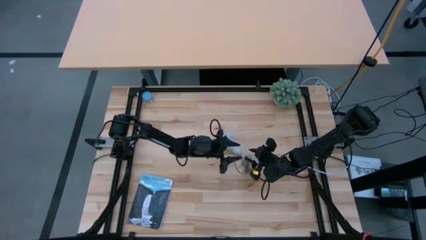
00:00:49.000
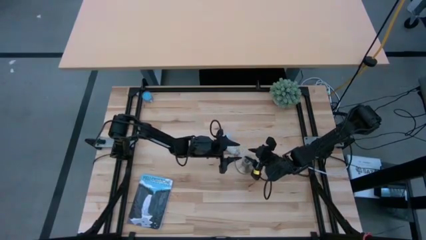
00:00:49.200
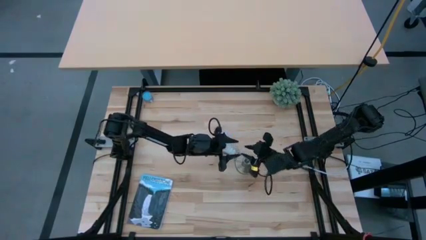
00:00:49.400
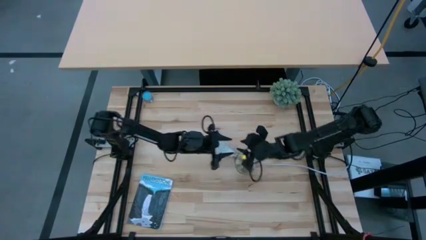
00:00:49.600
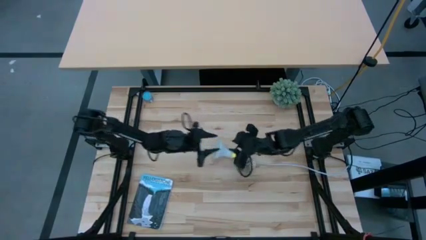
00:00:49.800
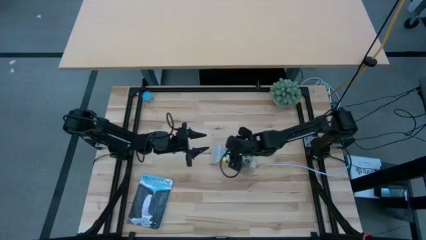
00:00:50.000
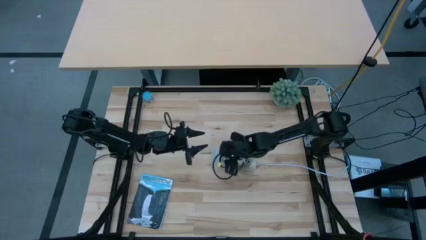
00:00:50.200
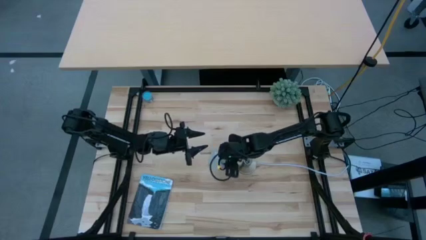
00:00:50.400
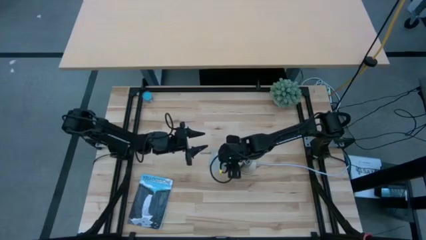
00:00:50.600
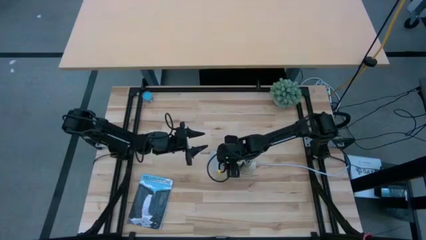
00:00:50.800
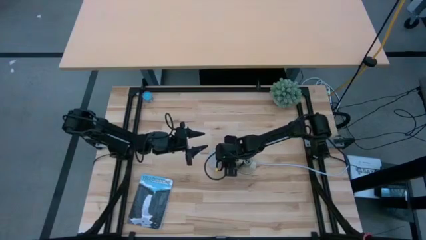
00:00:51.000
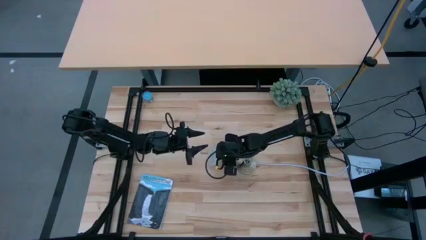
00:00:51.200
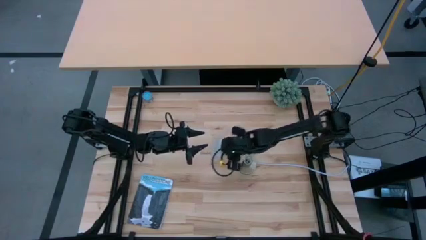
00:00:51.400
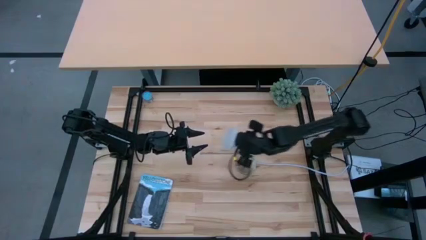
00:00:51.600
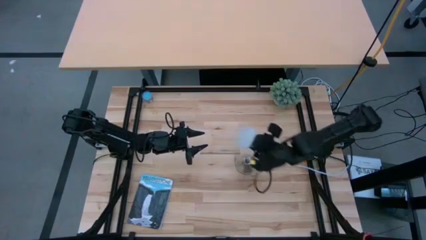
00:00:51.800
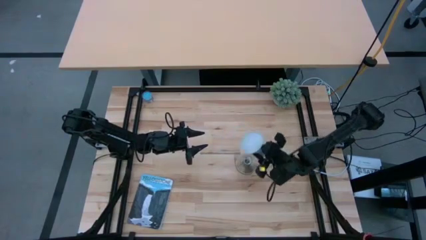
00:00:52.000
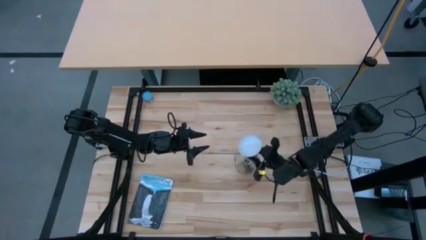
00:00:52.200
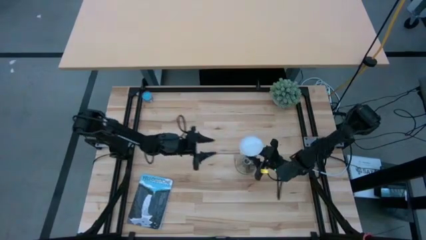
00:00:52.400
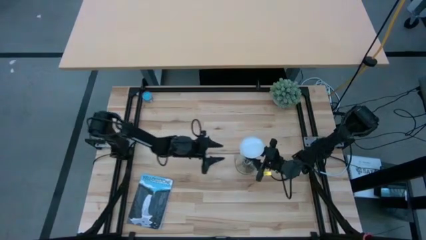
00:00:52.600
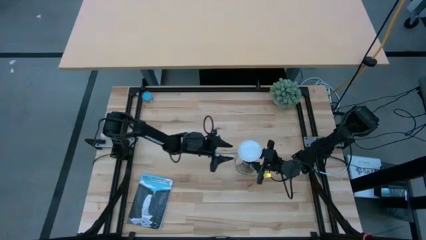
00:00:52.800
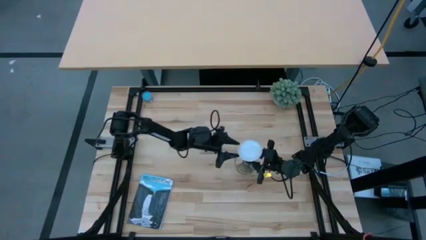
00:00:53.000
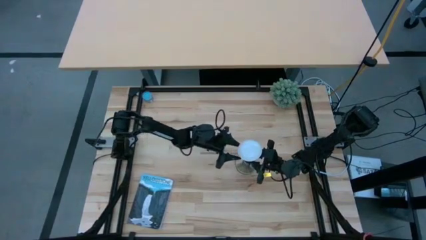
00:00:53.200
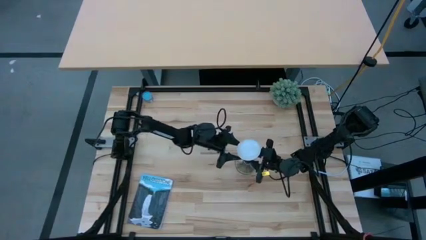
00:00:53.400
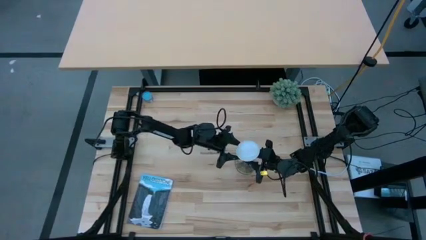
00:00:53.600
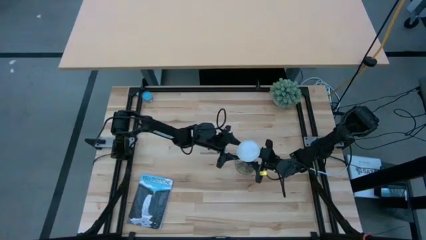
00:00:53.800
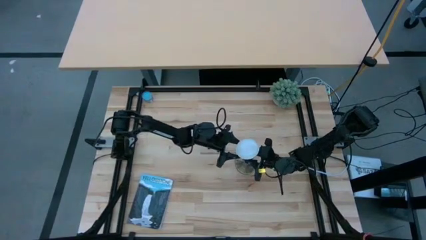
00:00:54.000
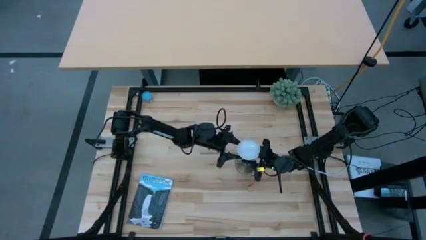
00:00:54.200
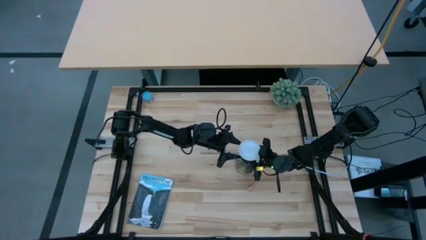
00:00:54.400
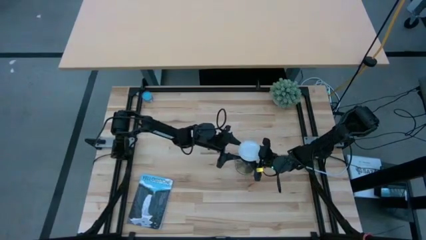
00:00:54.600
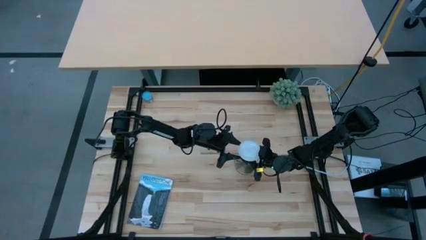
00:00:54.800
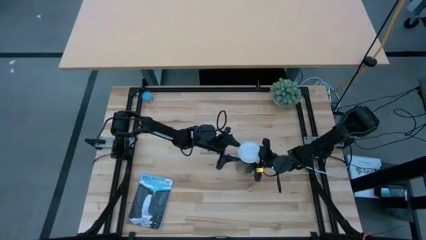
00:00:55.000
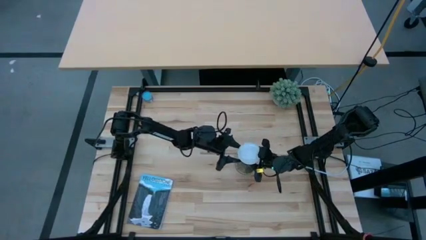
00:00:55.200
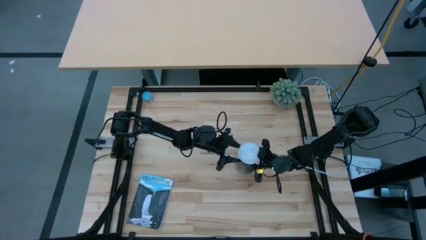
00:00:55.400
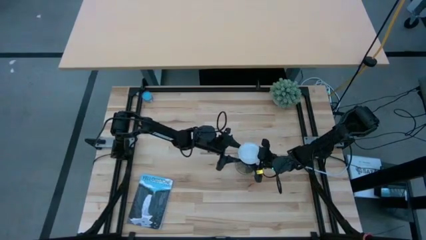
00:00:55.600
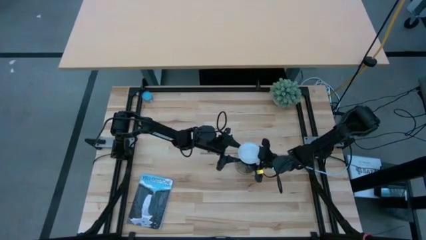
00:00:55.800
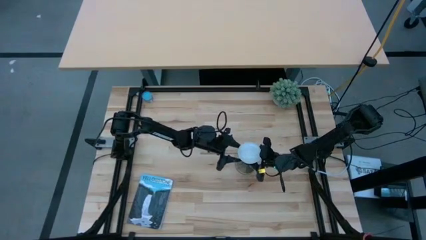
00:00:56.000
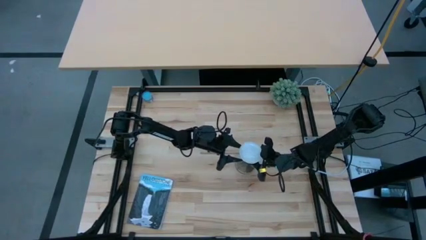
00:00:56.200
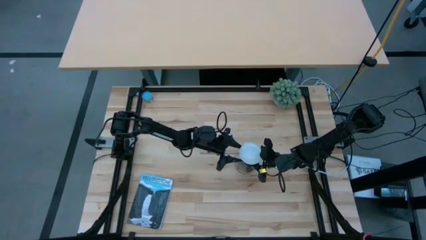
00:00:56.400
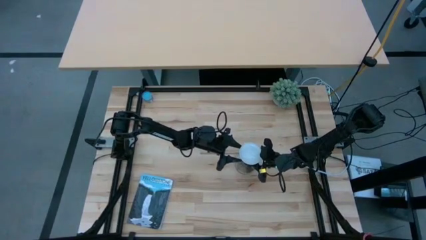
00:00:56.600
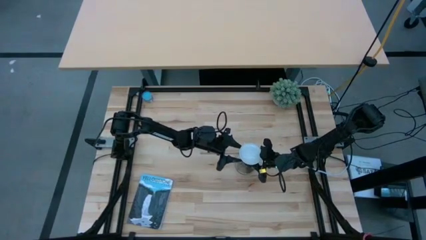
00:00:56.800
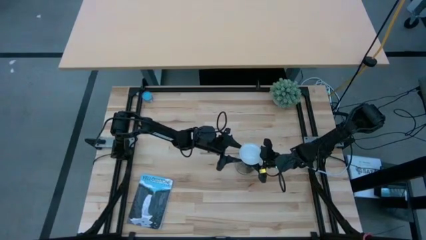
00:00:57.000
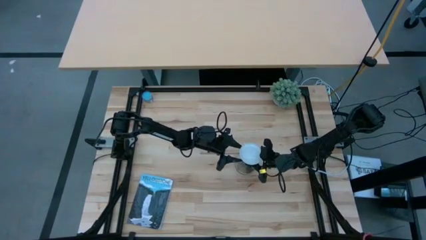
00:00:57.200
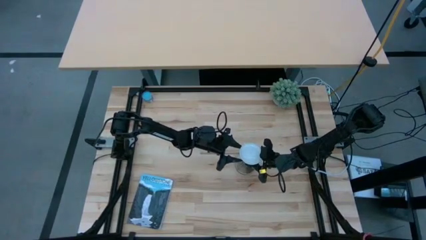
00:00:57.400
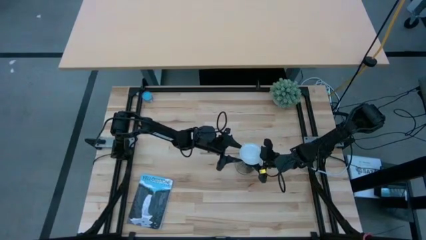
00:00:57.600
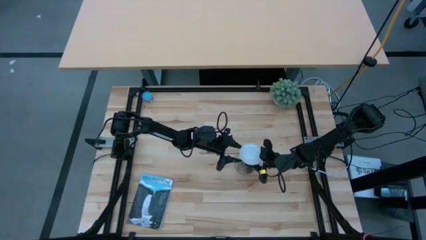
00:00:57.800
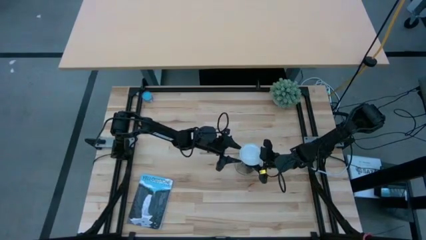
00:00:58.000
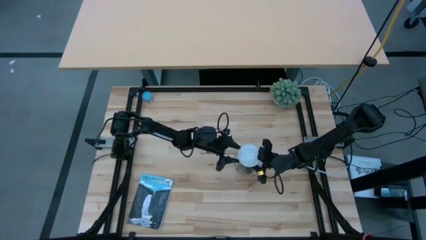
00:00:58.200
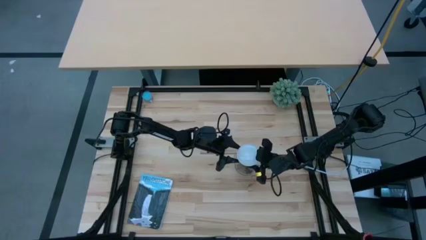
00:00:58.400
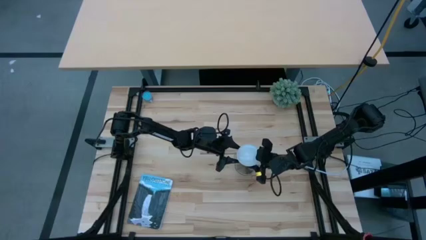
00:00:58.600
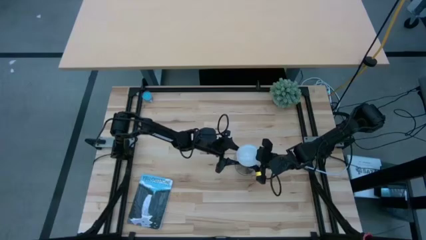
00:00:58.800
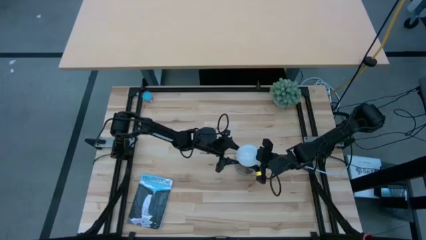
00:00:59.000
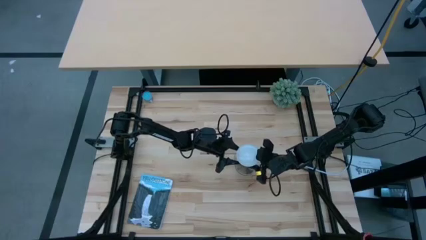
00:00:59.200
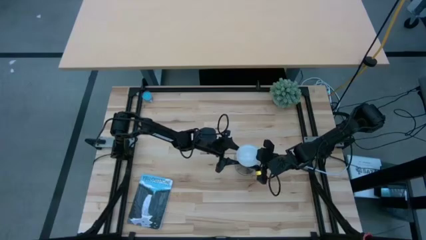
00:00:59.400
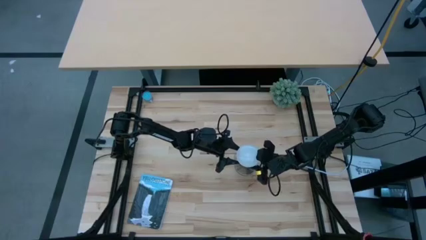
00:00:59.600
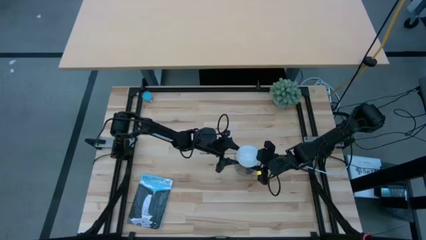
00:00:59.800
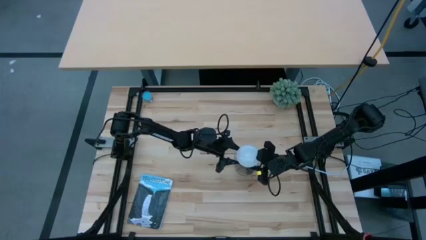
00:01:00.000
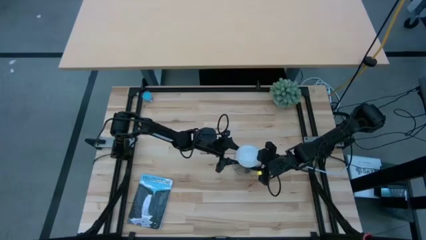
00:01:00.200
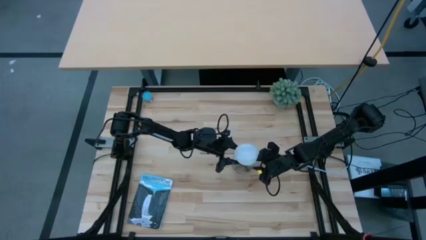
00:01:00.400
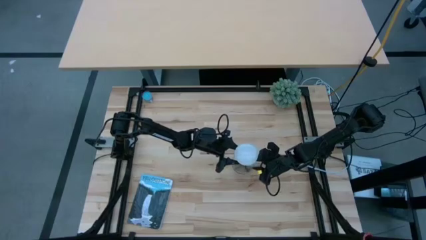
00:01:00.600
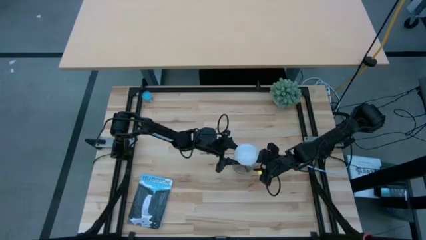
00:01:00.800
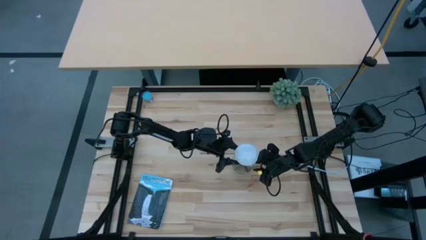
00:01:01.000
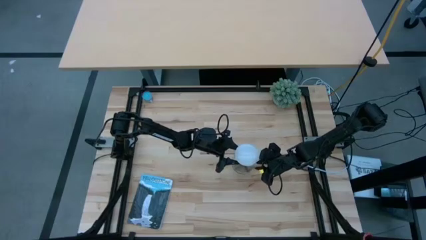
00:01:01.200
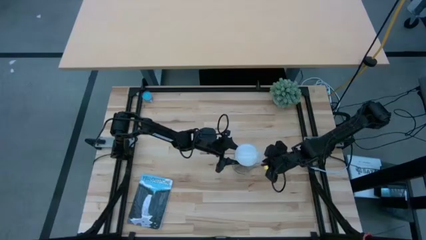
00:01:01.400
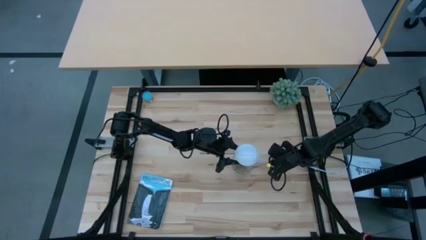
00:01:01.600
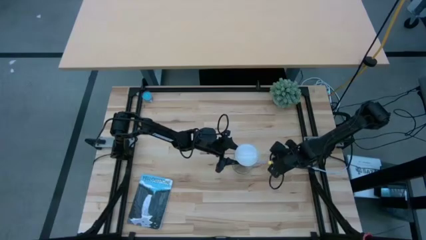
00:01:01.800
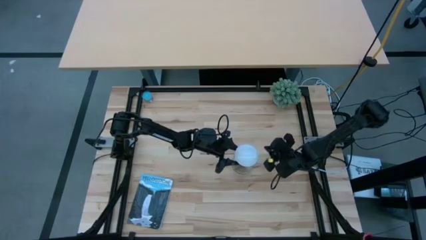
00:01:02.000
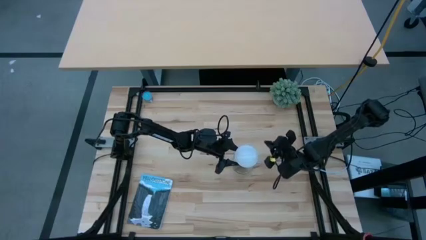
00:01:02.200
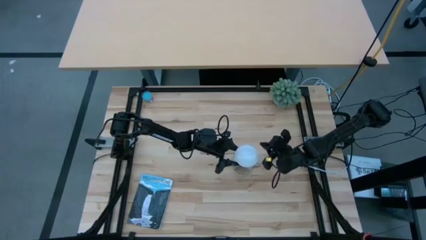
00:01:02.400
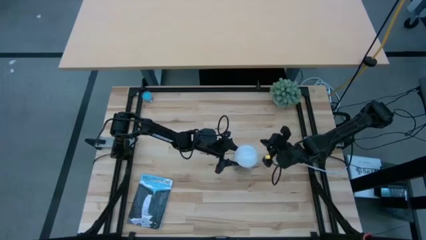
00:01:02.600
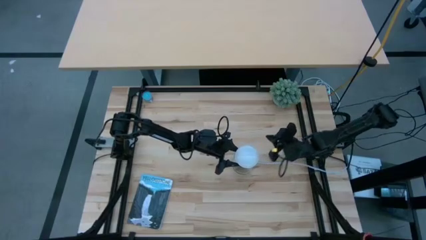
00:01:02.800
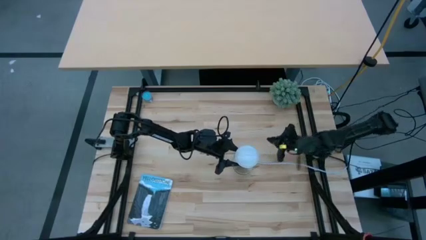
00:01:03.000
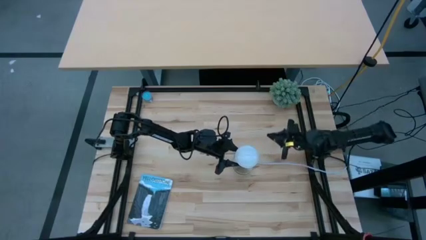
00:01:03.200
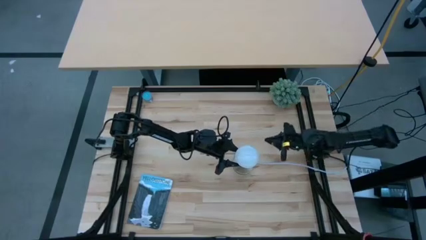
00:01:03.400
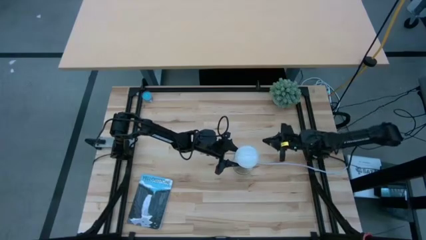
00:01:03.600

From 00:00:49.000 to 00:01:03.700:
Task: Screw lightbulb
Insert the lightbulb into the bronze lamp socket

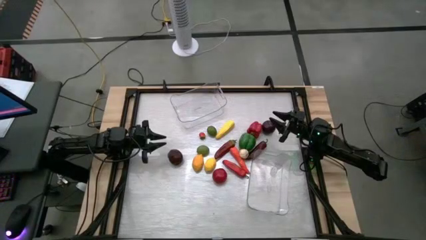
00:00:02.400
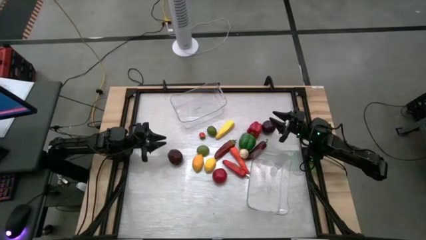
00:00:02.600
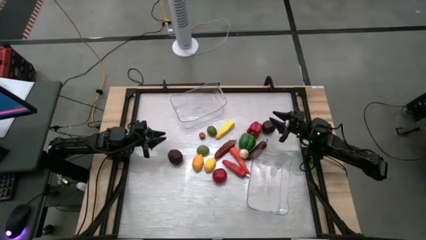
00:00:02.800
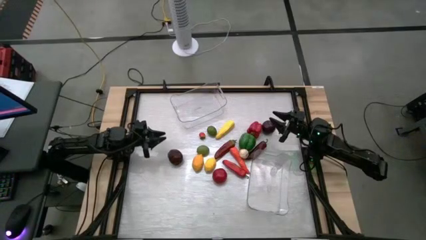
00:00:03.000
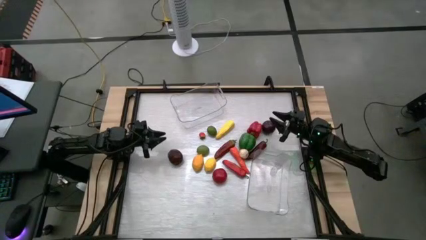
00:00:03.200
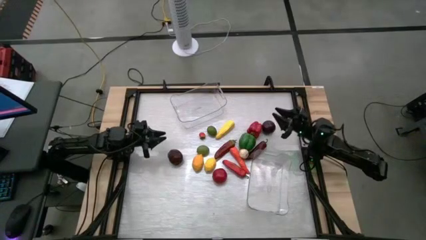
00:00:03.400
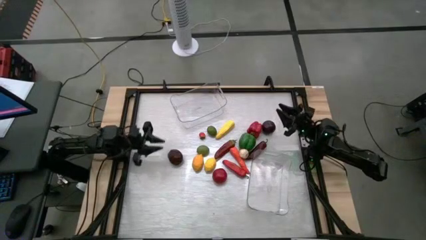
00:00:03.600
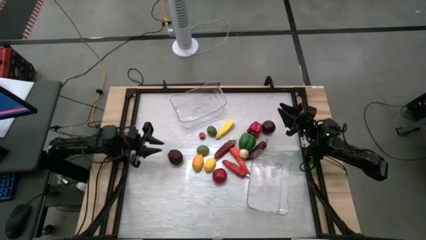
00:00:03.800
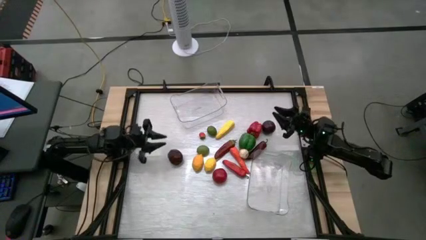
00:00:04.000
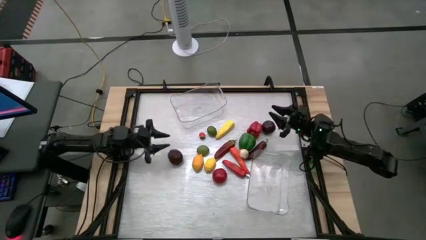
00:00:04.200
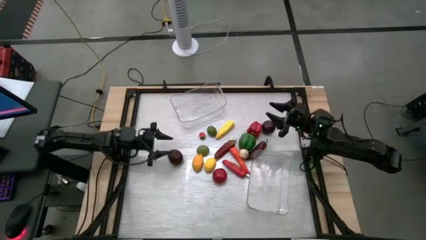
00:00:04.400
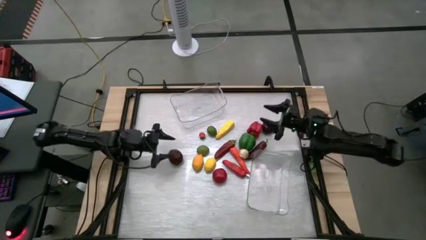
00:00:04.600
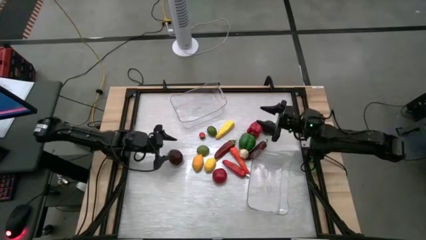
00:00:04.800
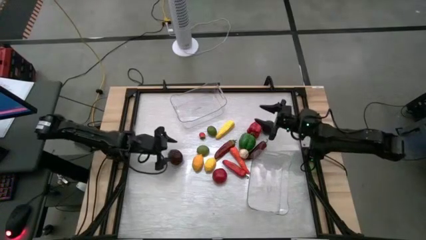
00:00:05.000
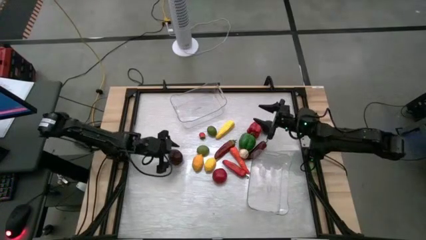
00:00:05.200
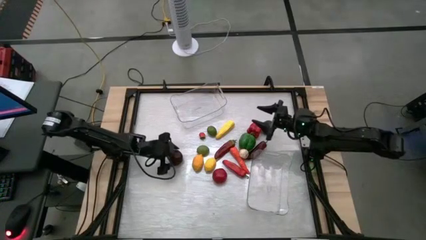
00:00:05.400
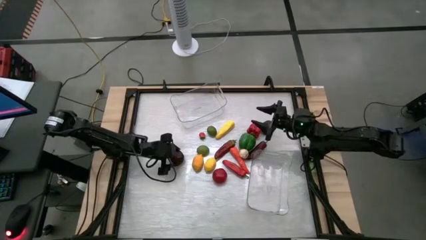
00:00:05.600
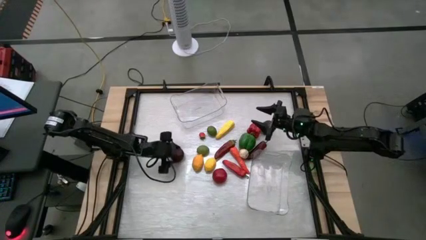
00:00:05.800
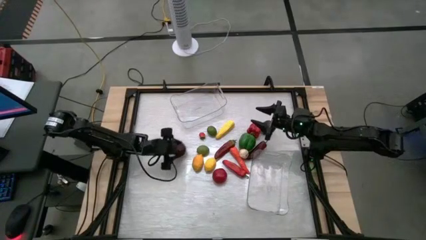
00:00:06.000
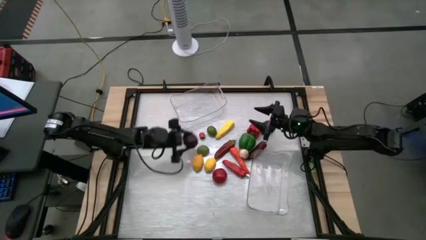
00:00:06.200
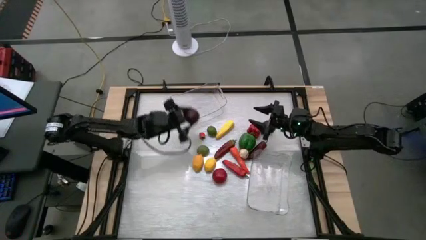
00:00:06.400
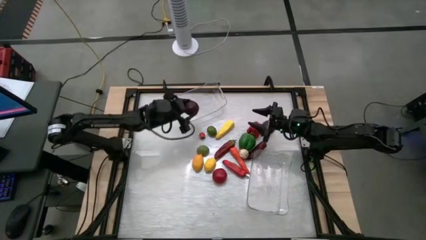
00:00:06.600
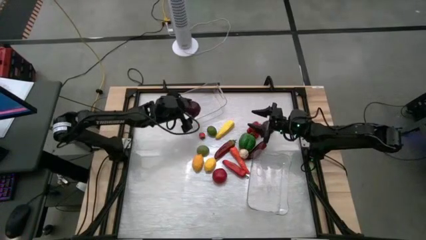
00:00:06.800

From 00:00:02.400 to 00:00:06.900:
Task: Sort produce into baskets
Put the left red apple into the top transparent bin
